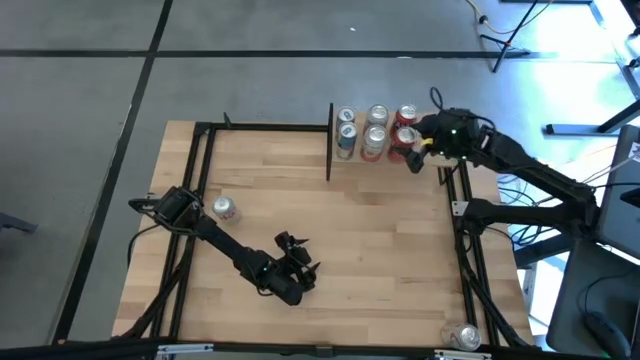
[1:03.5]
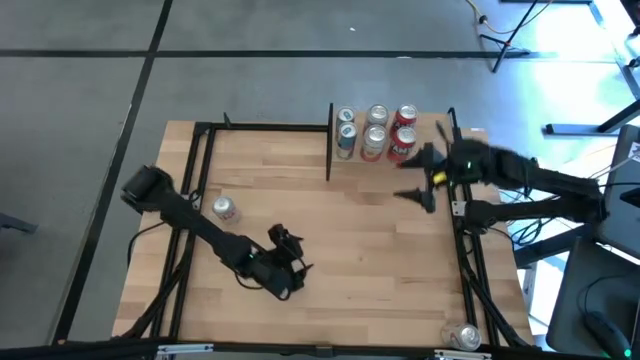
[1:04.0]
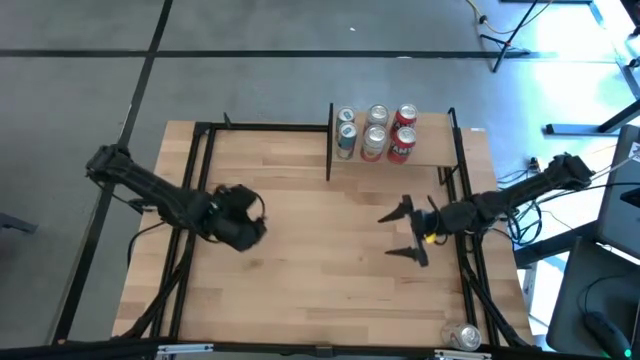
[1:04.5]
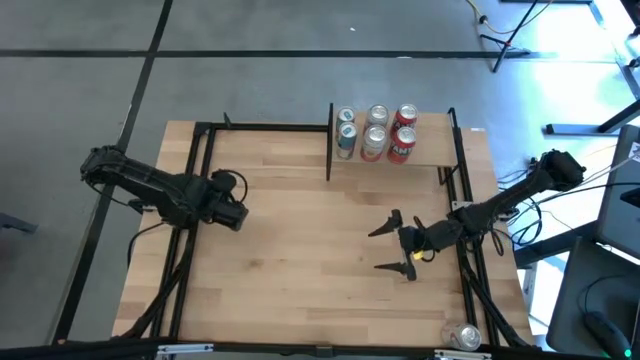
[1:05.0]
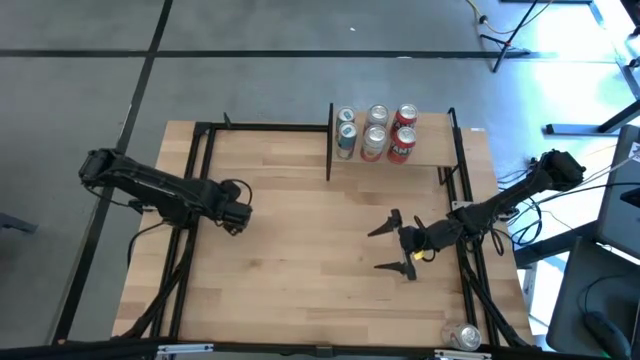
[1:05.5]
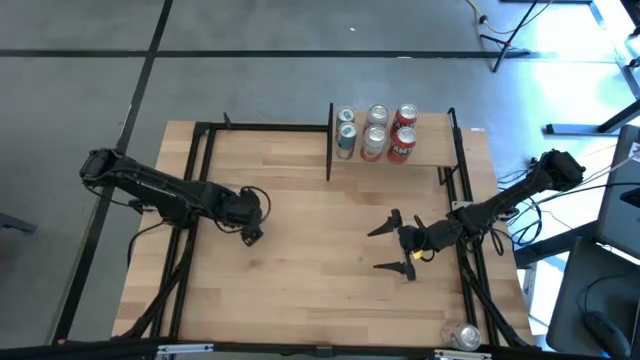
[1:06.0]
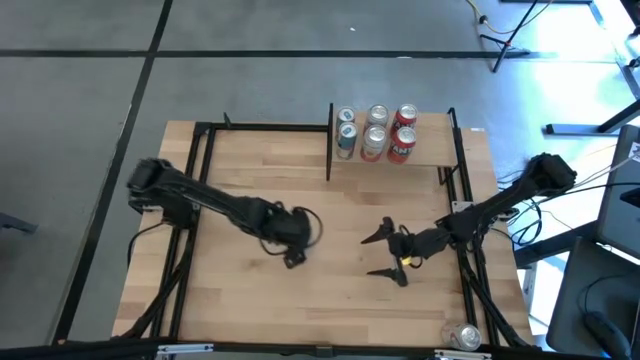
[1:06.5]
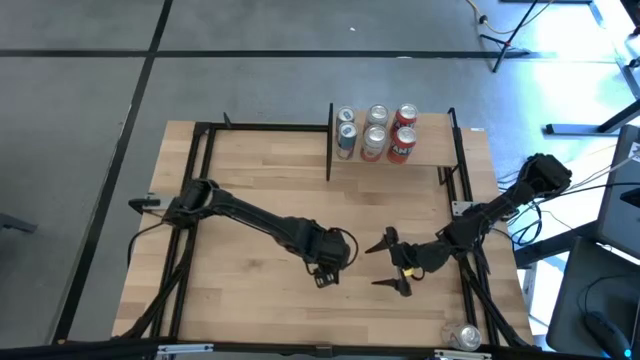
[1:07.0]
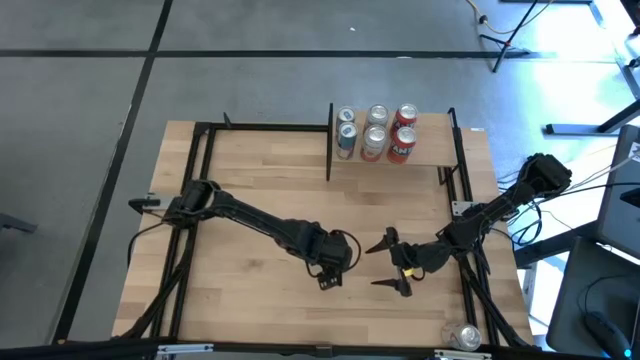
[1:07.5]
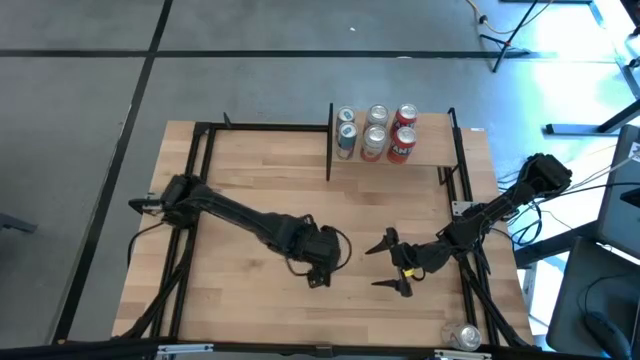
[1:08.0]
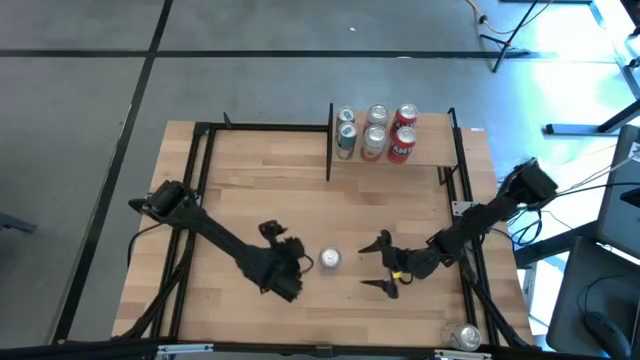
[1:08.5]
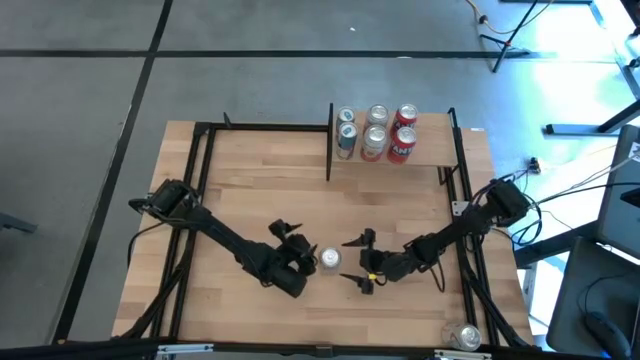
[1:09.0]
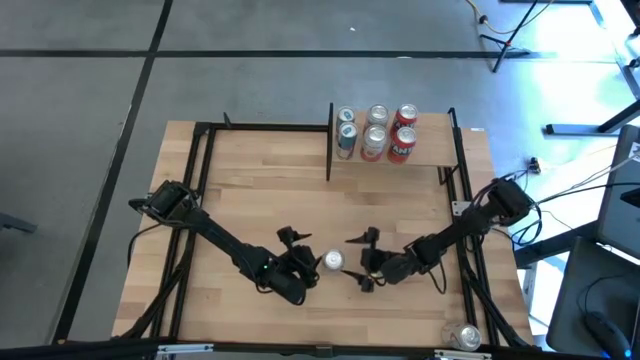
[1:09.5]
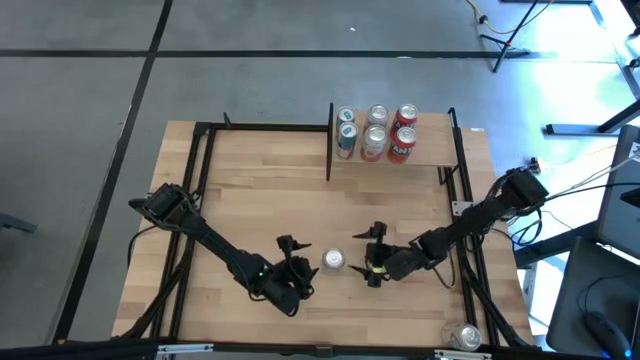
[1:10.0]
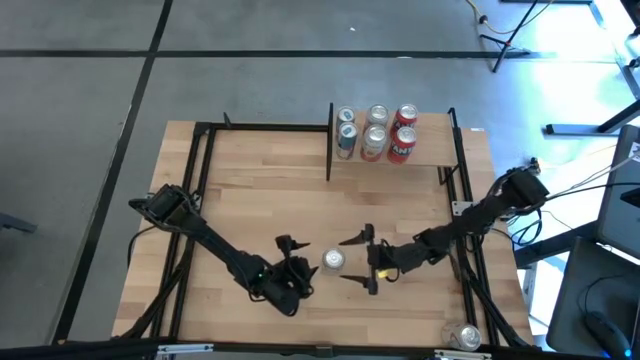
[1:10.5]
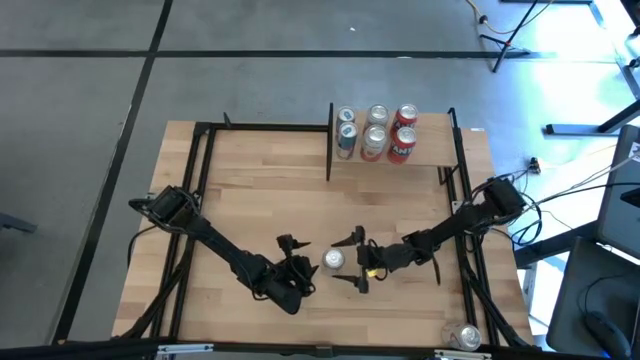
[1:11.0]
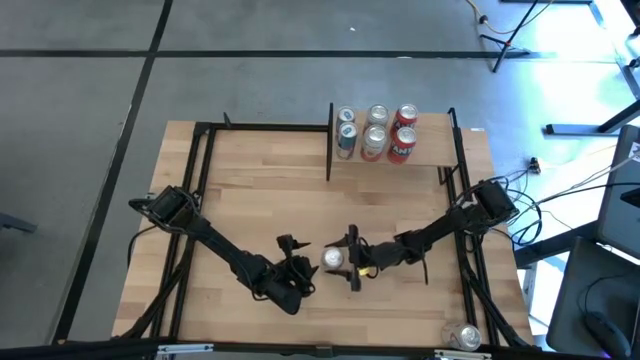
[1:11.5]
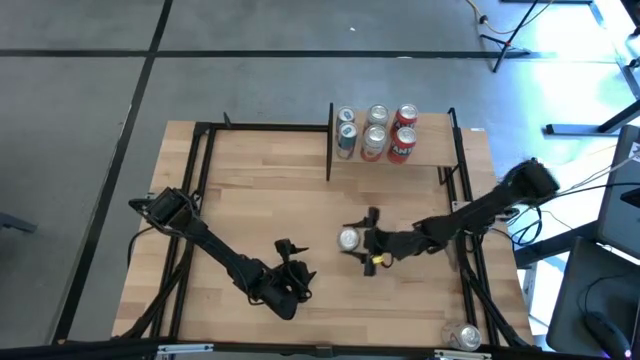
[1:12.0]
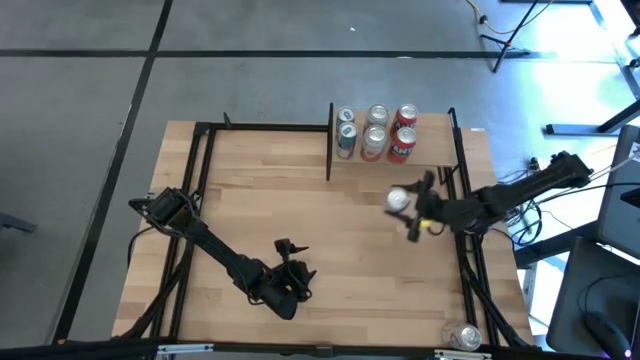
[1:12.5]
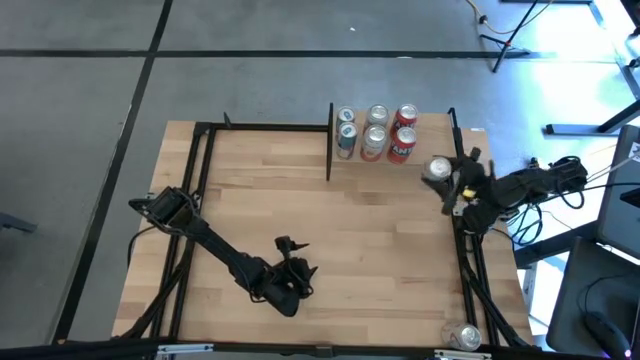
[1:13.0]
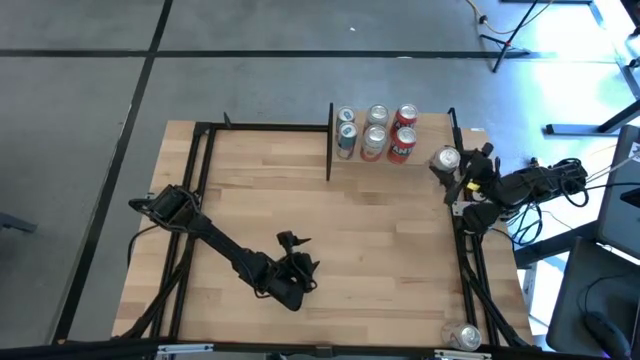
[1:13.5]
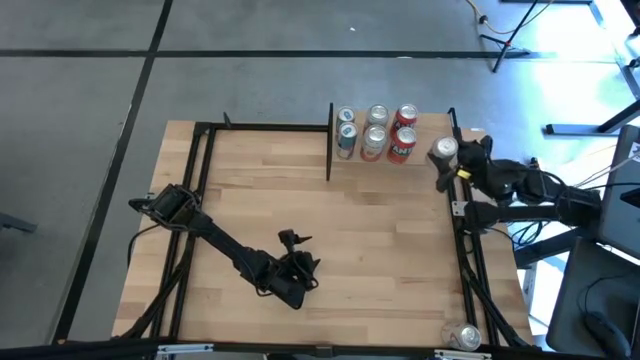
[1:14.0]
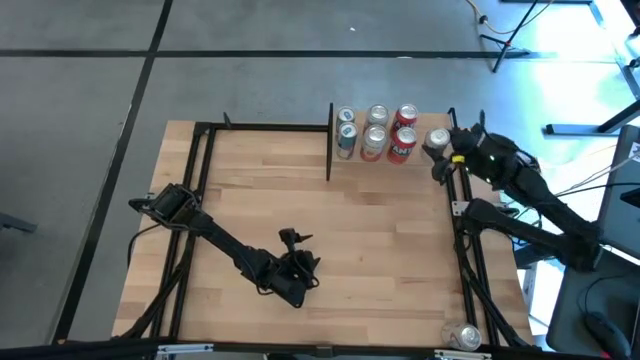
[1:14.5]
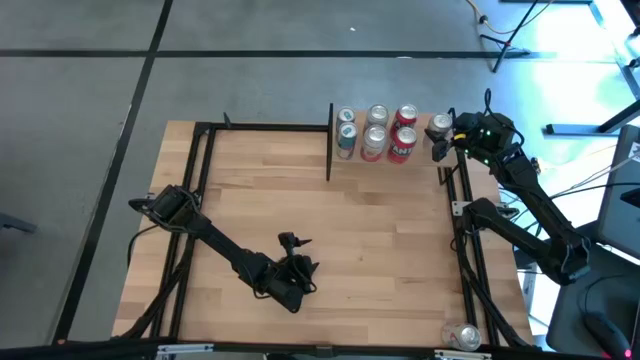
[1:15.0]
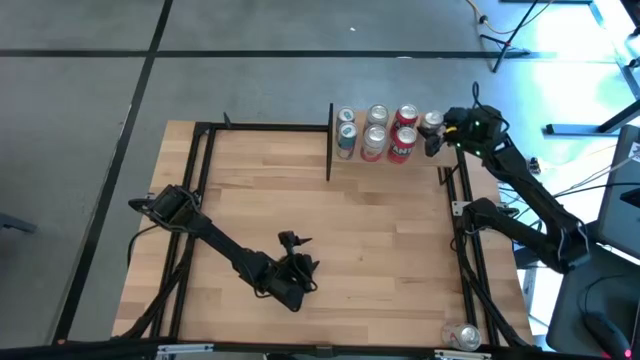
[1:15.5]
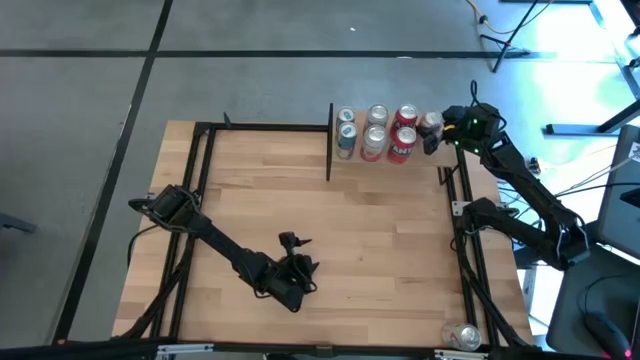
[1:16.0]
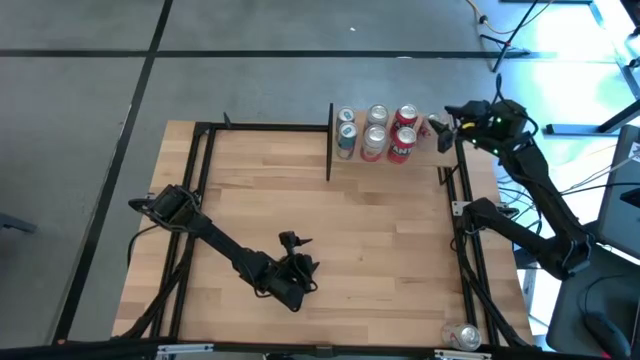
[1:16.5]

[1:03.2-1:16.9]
Task: Place canned beverage on shelf
Put the top red silver soda can on the shelf

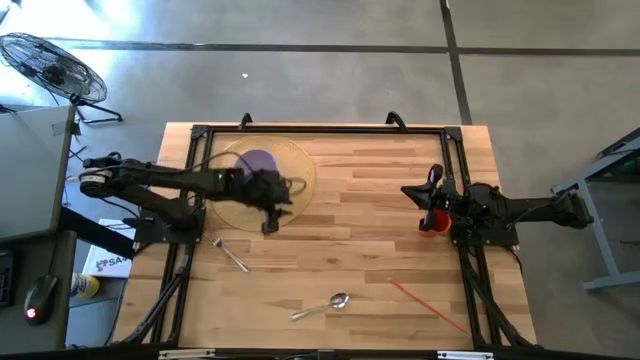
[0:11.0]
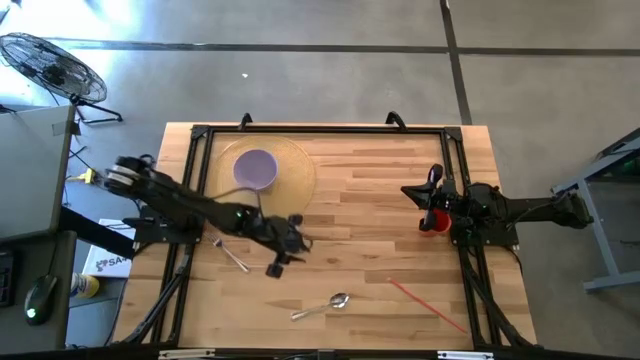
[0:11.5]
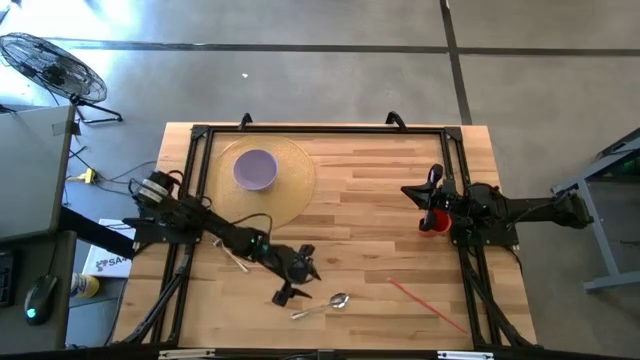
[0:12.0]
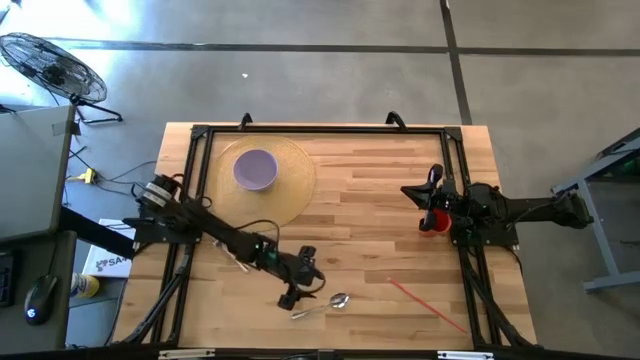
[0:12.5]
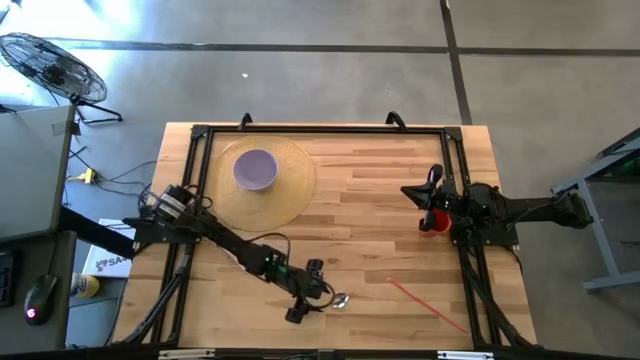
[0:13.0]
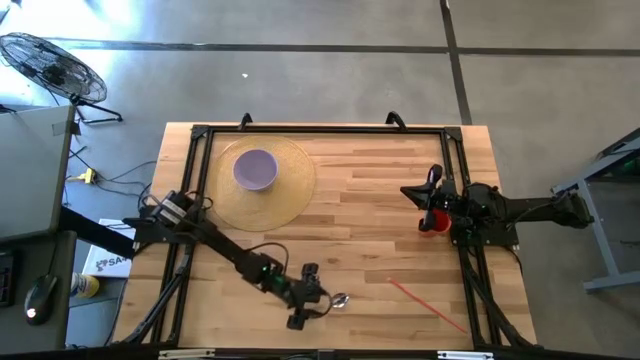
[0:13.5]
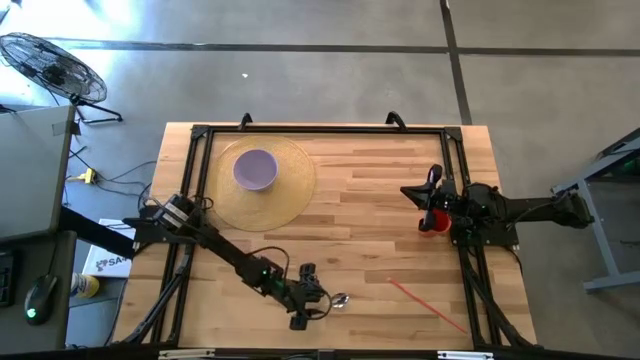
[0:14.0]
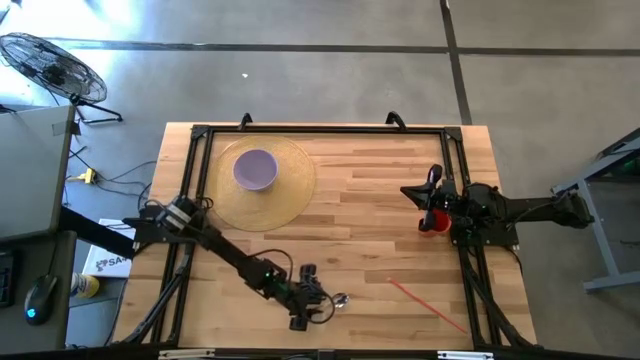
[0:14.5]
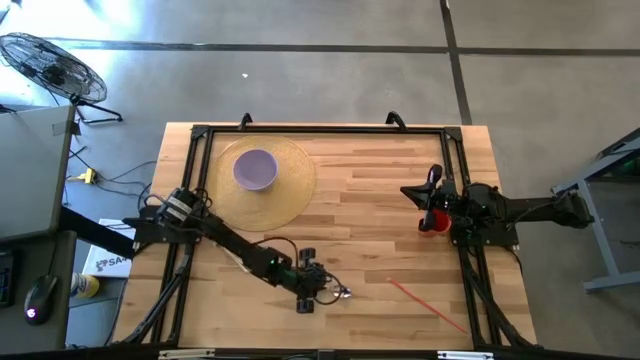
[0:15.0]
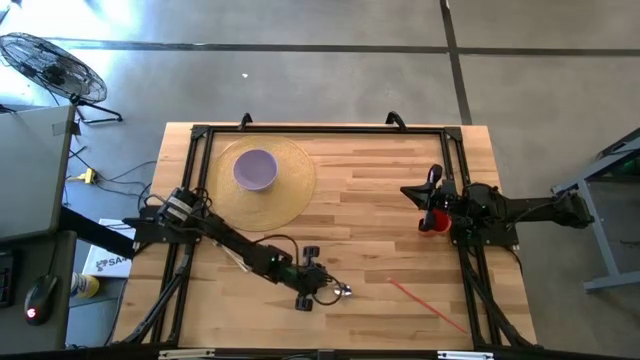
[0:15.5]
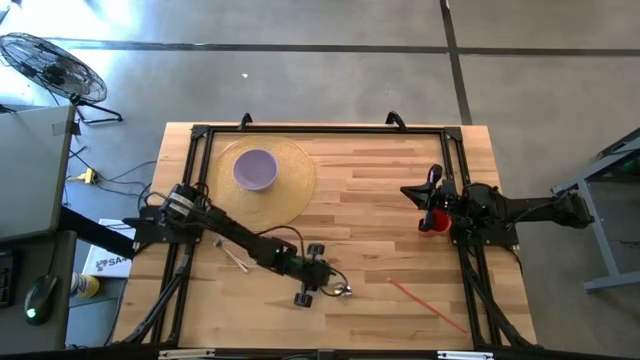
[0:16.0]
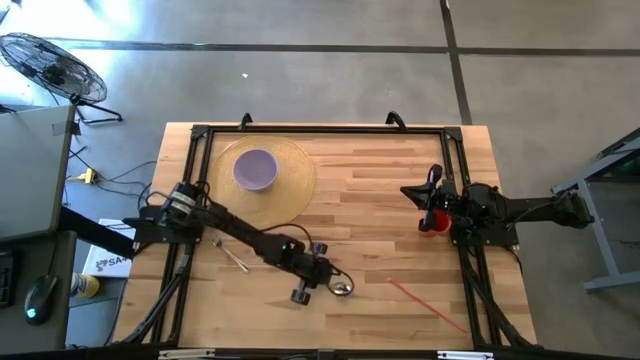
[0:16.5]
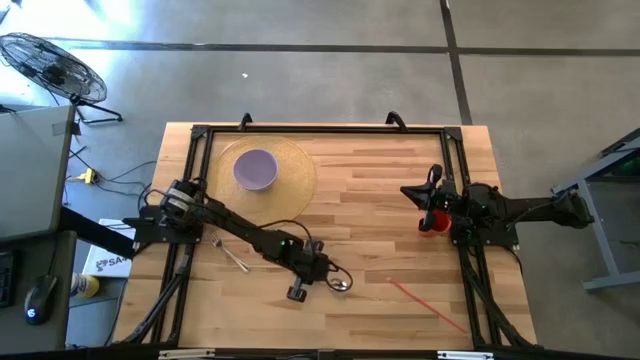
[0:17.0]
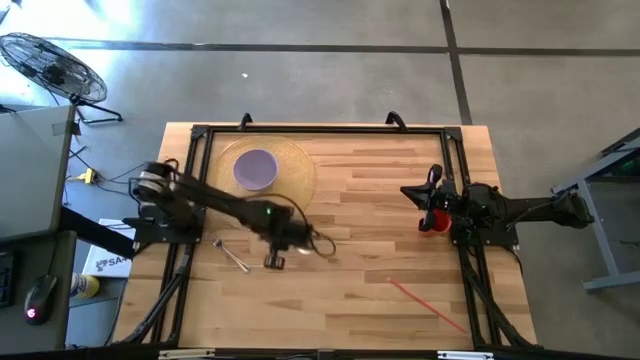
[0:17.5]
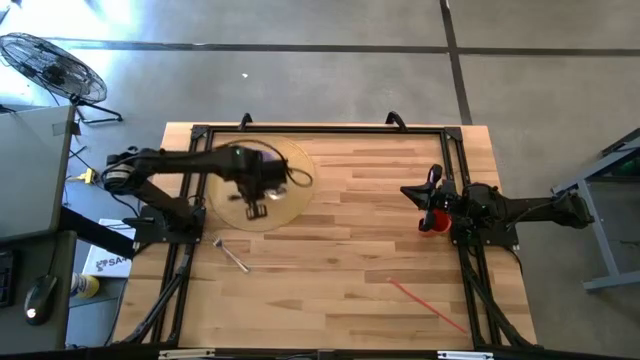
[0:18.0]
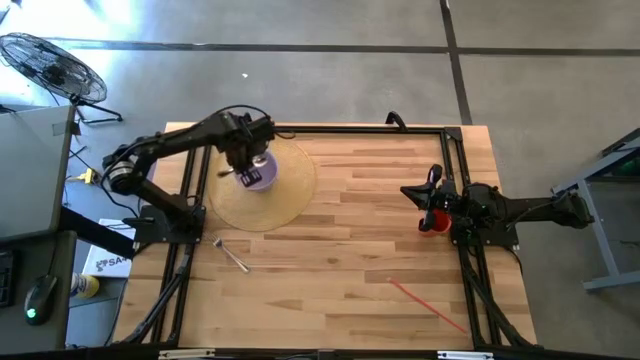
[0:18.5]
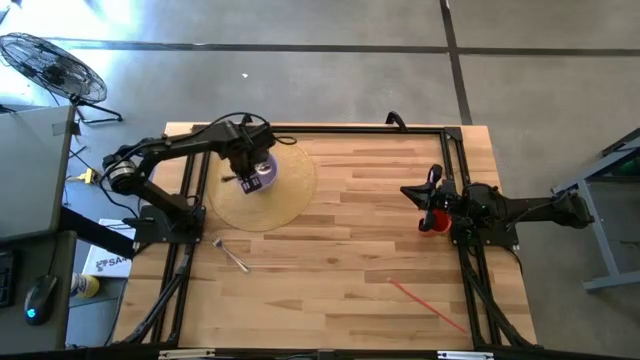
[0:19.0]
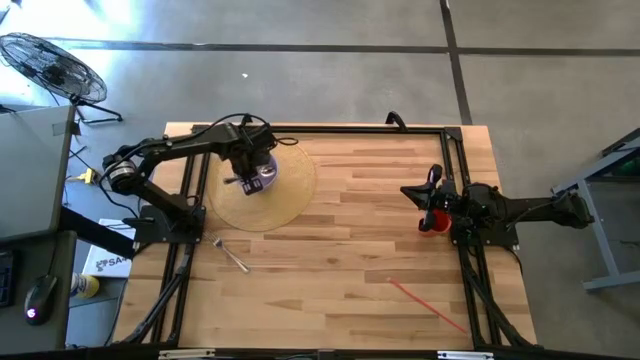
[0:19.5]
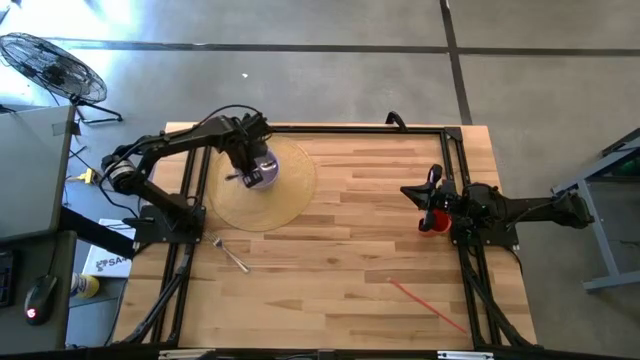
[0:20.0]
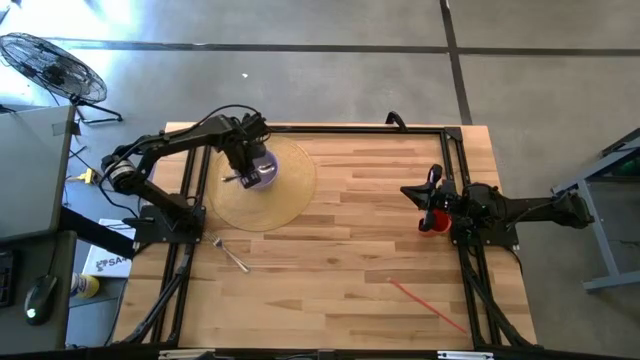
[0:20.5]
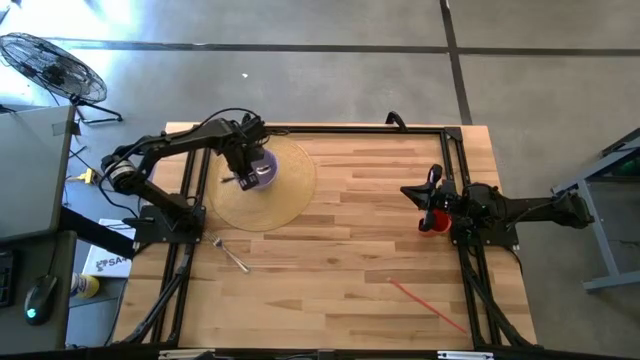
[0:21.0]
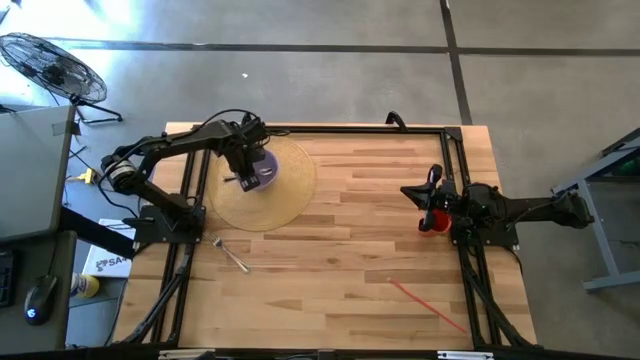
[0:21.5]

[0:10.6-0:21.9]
Task: Pick & Place Utensil
Put the silver spoon into the purple bowl
